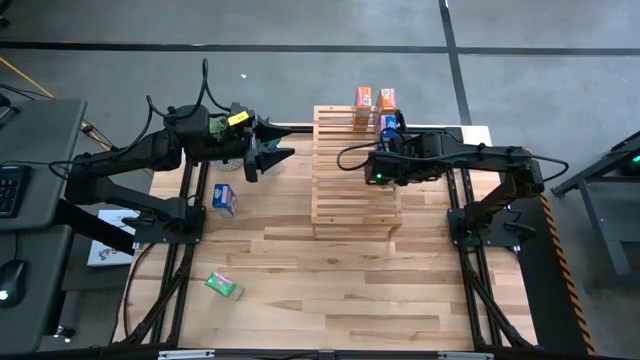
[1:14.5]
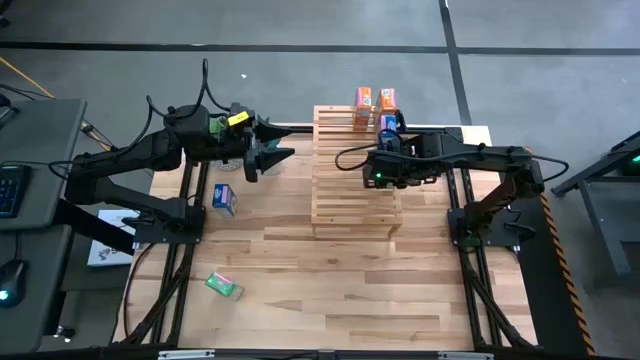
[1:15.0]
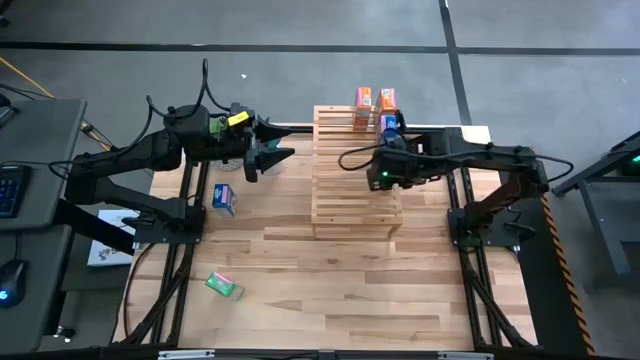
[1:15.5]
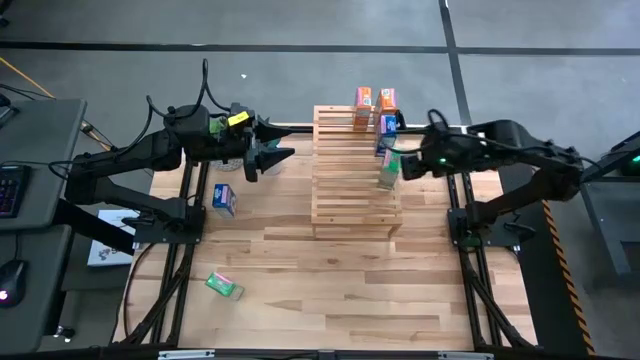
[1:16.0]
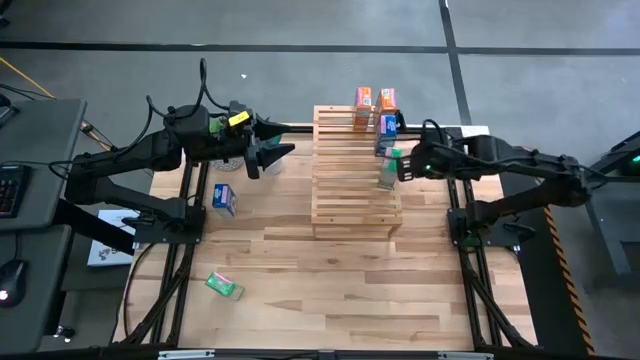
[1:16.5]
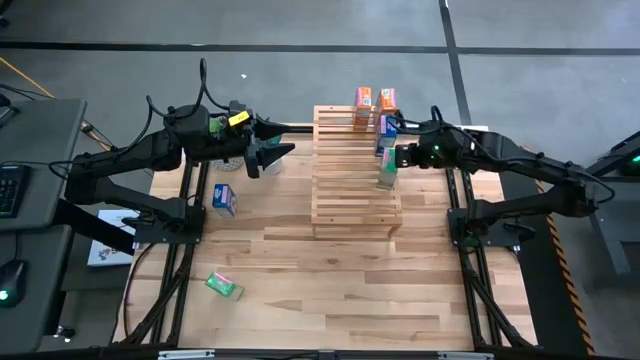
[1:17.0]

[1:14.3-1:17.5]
Task: Stack cereal on shelf
Move the green cereal box beside the blue cereal box on the shelf

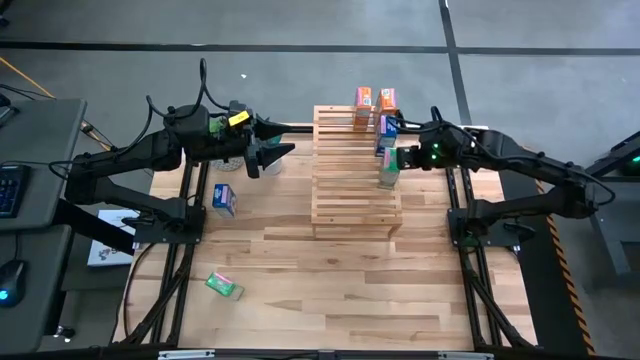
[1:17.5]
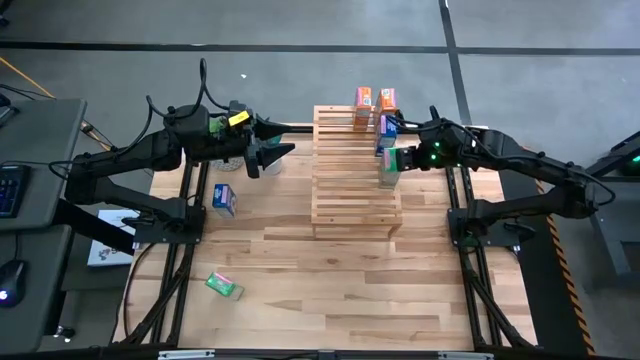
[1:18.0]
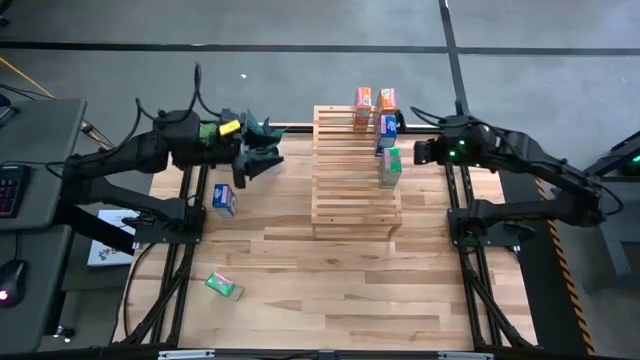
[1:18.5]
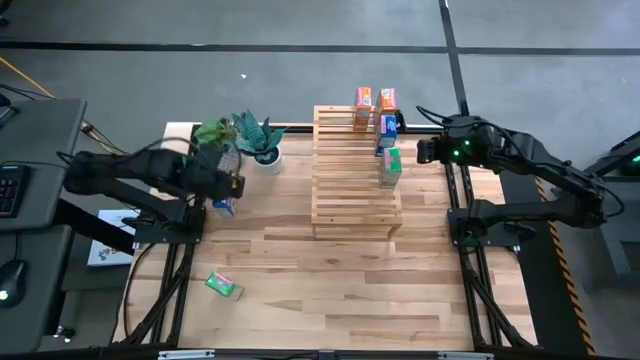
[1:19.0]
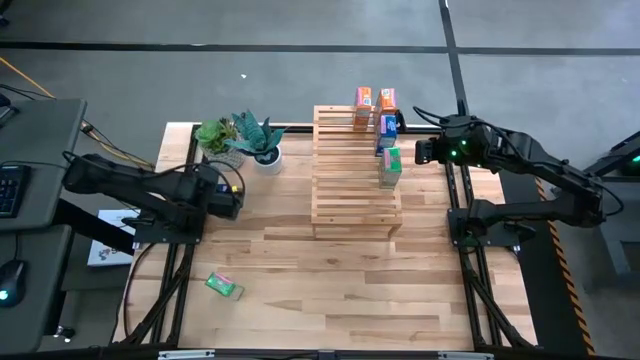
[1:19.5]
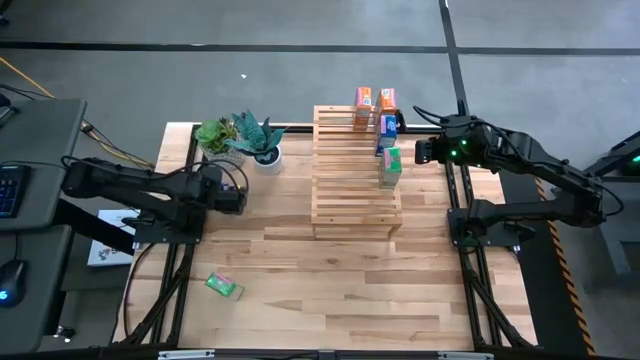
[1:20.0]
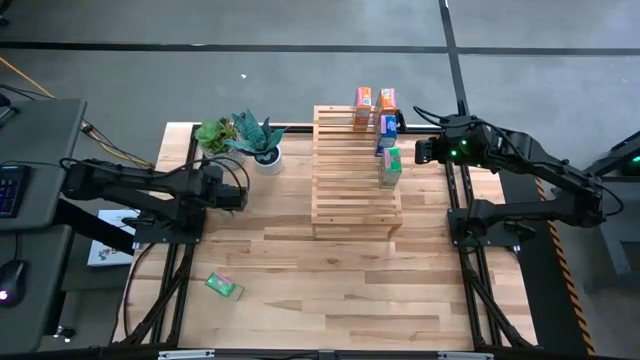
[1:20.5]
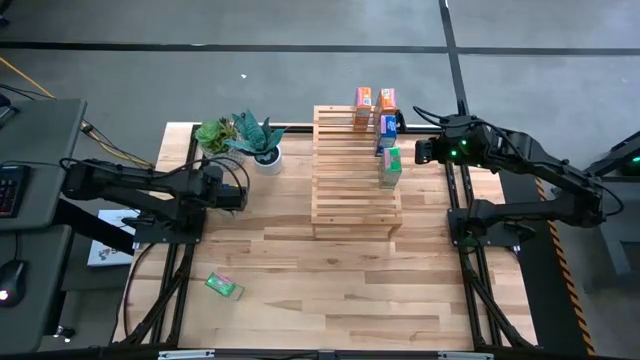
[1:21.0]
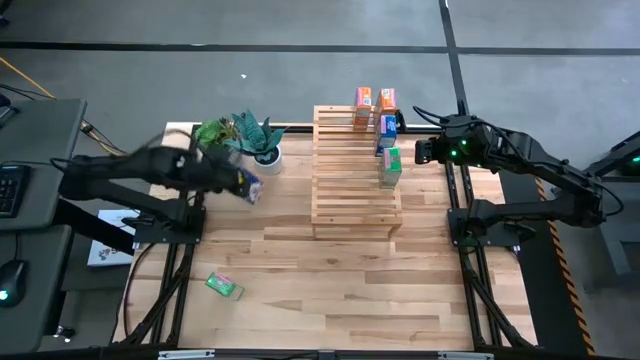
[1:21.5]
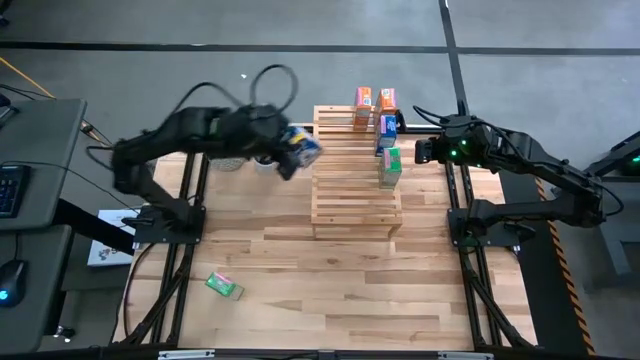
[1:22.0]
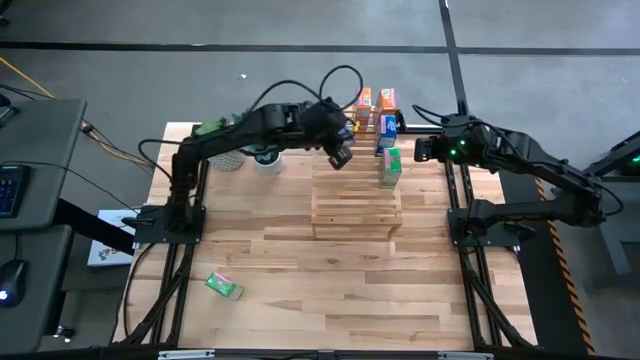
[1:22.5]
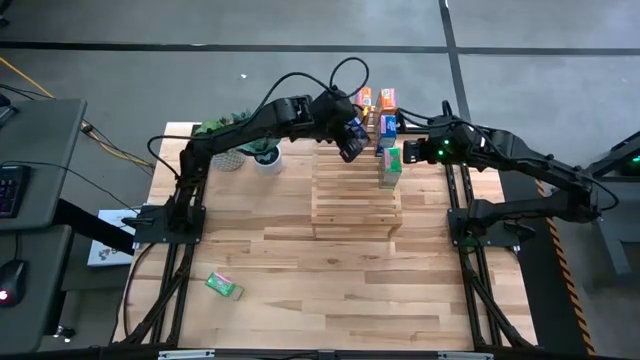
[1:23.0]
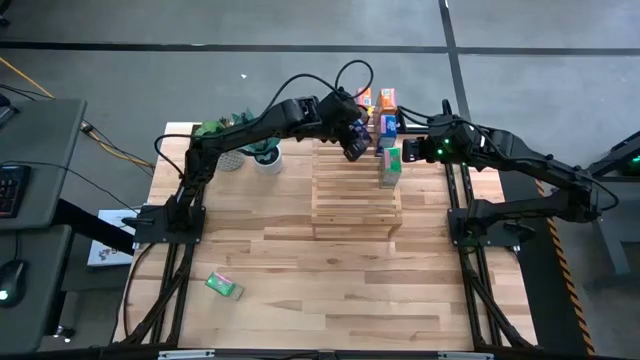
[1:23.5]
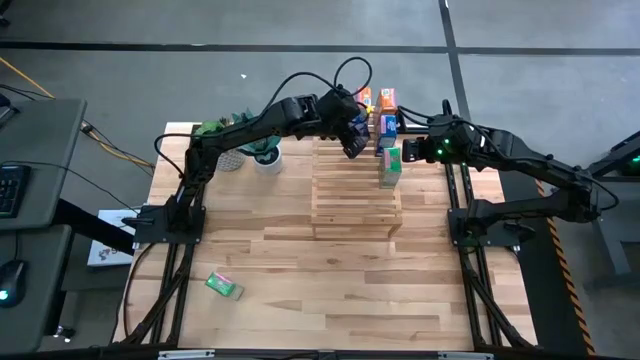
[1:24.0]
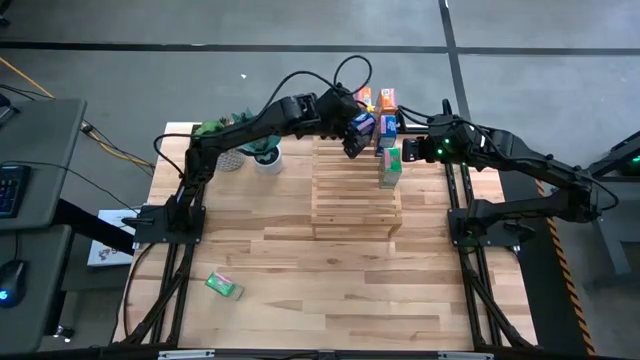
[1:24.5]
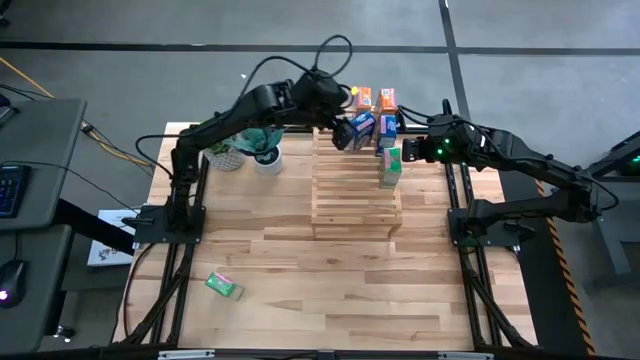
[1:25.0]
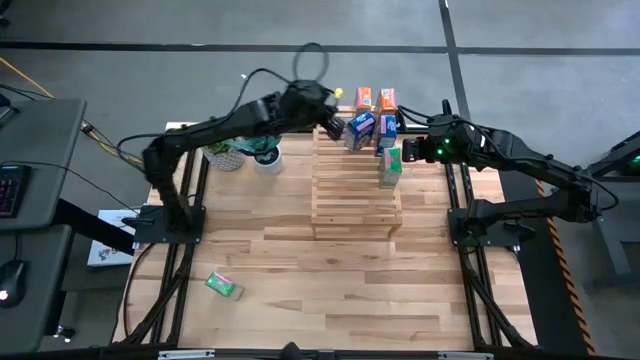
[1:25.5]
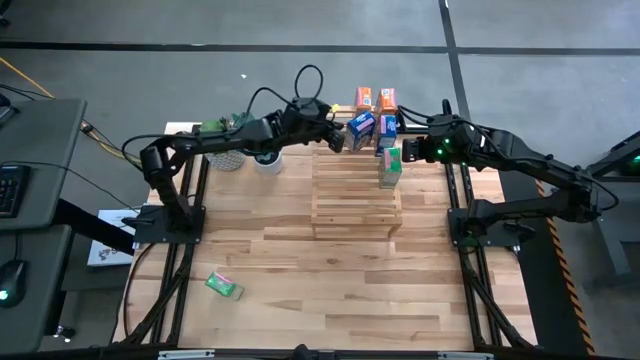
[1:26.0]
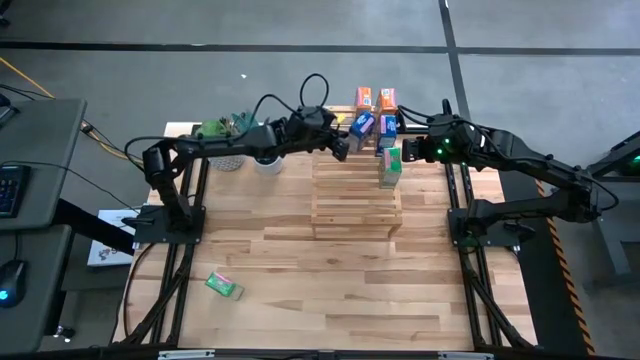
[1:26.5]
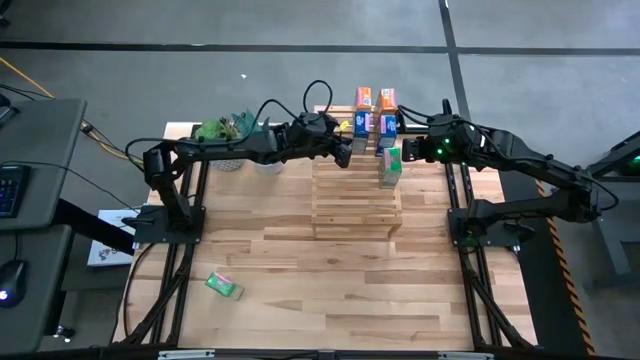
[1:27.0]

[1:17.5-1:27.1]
Put the top left blue cereal box on the shelf

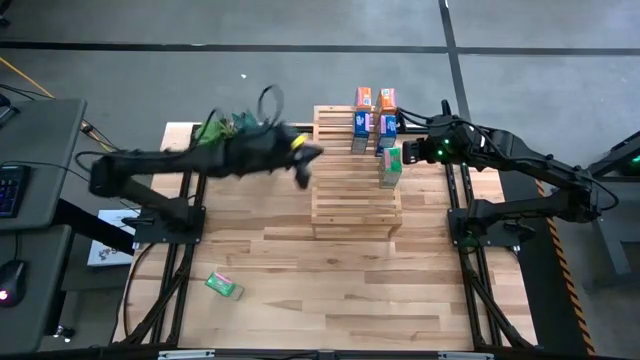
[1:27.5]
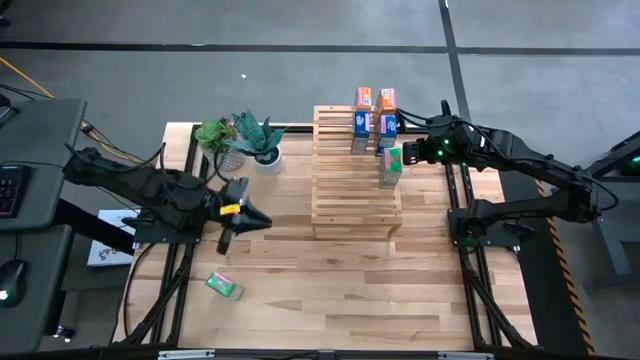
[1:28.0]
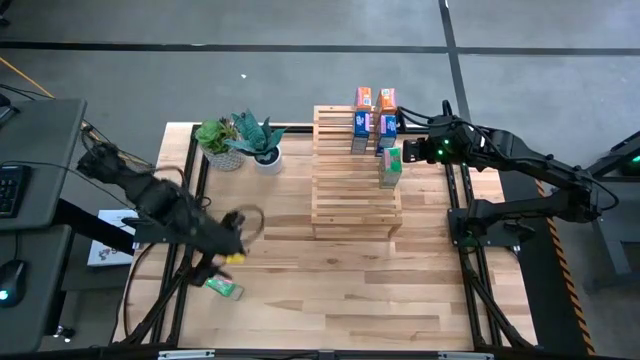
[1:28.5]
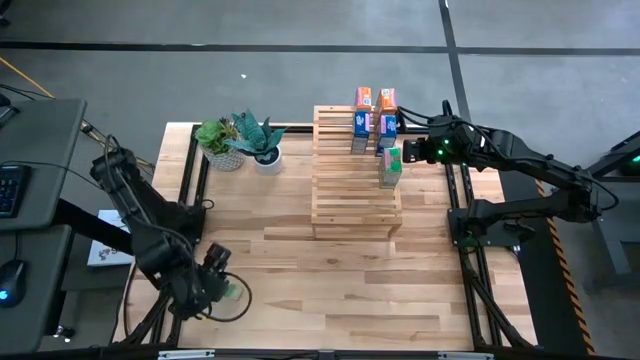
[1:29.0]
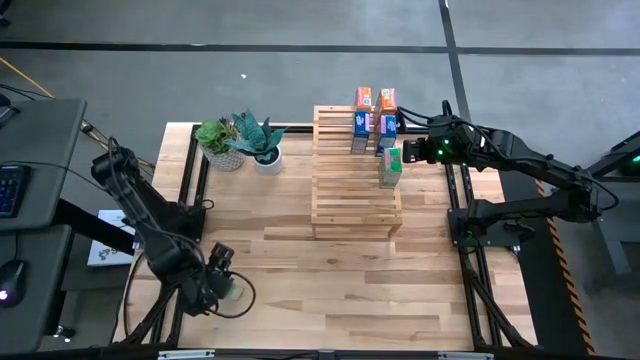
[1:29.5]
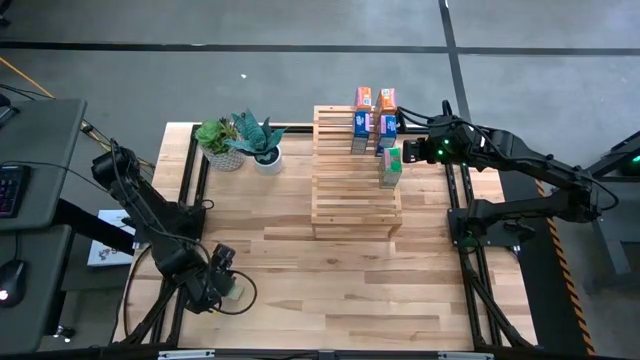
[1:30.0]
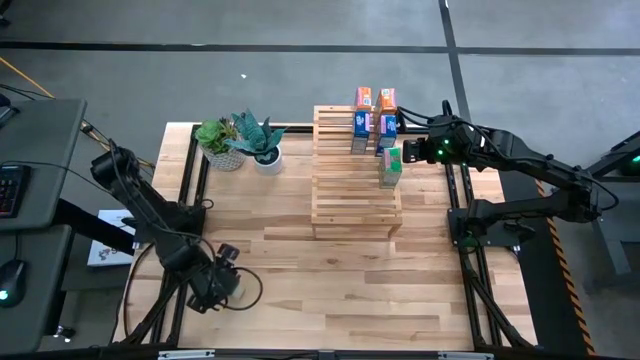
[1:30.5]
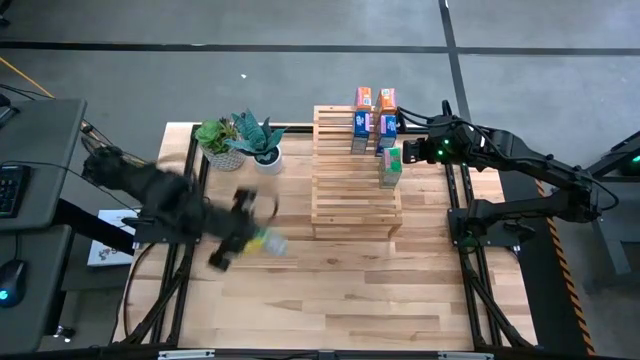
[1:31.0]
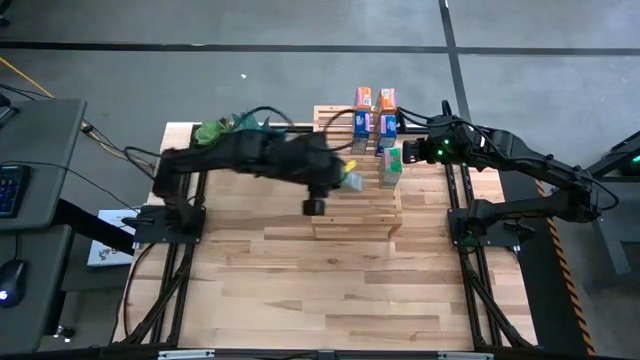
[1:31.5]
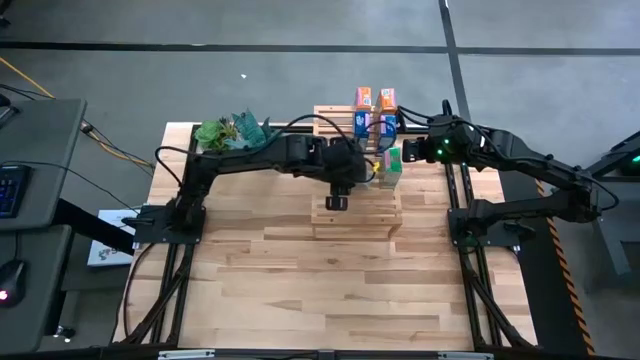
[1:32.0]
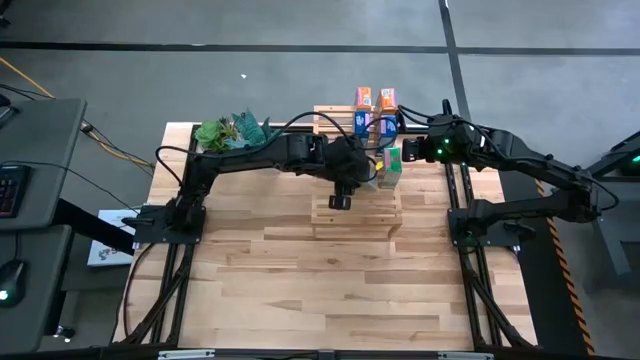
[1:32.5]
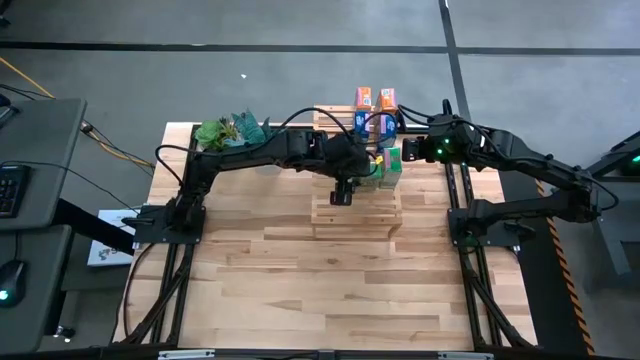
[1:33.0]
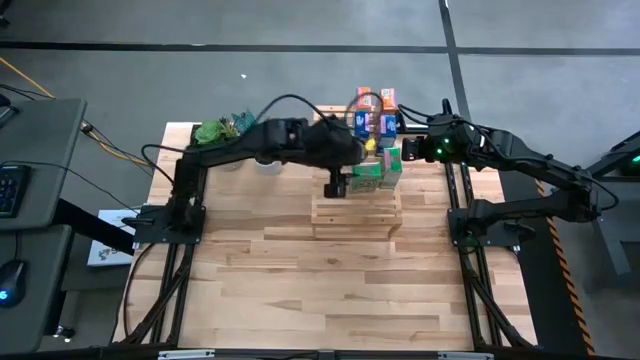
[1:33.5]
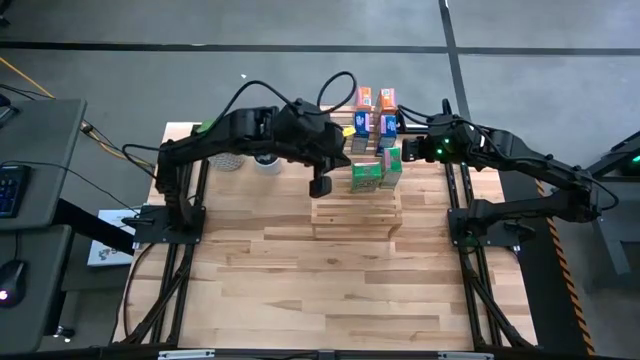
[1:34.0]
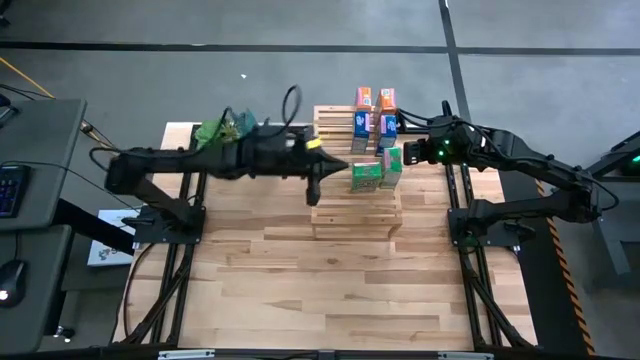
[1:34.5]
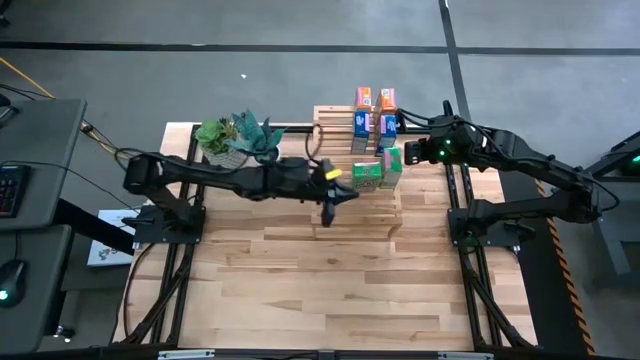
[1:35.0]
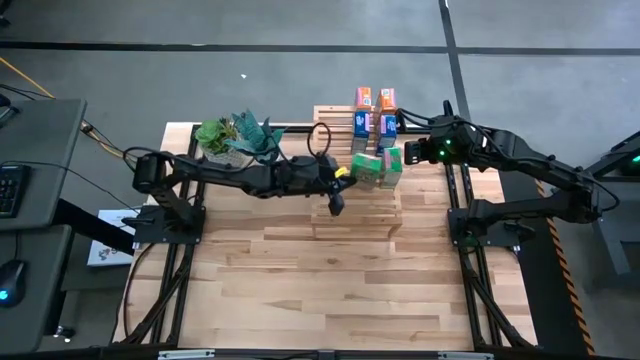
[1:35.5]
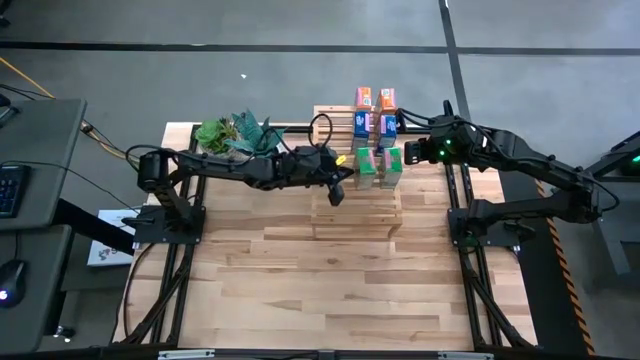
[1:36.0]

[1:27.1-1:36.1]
Put the bottom left green cereal box on the shelf
